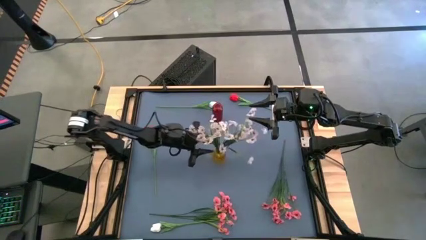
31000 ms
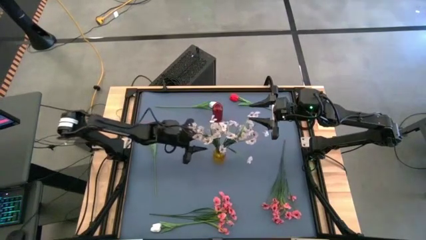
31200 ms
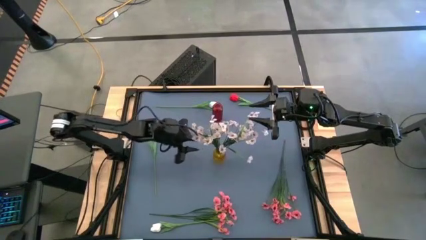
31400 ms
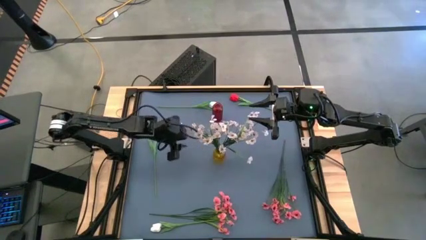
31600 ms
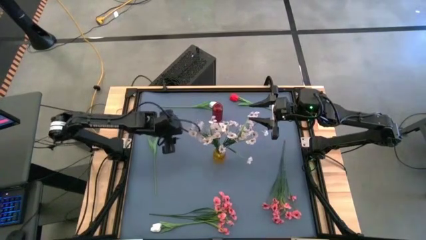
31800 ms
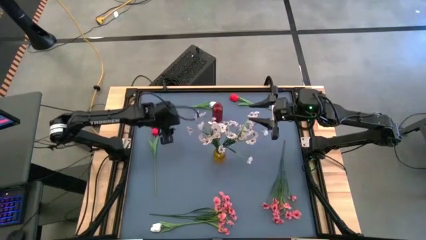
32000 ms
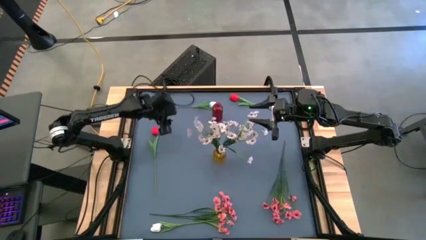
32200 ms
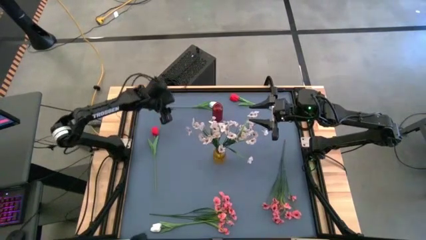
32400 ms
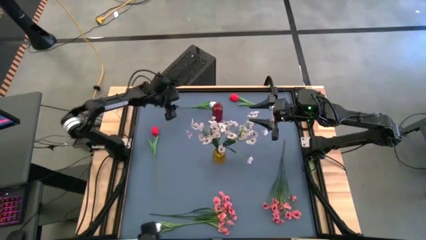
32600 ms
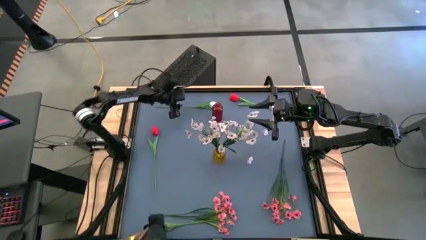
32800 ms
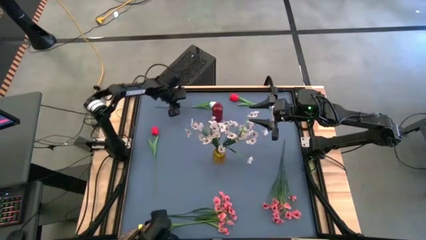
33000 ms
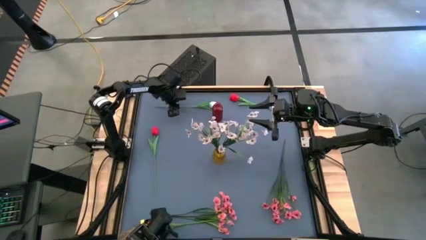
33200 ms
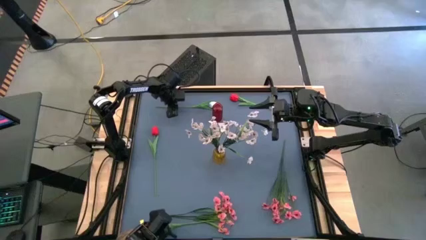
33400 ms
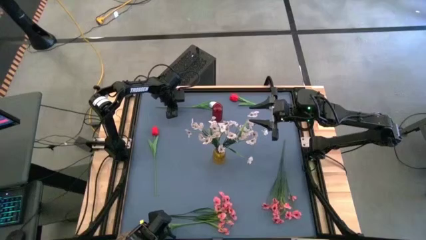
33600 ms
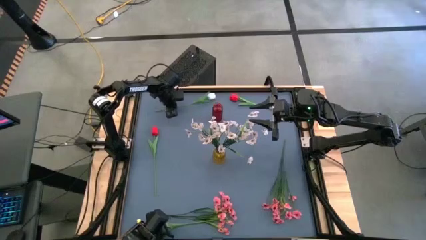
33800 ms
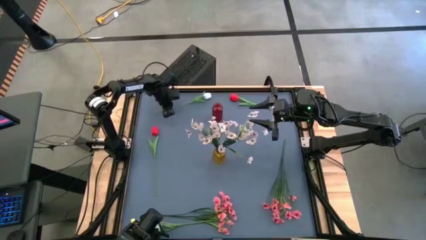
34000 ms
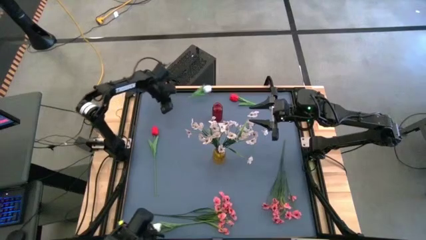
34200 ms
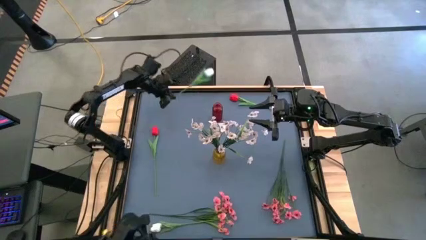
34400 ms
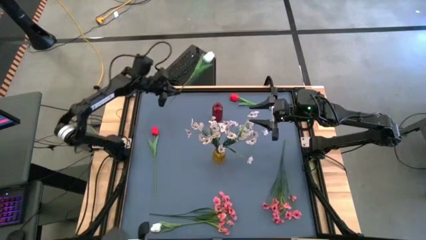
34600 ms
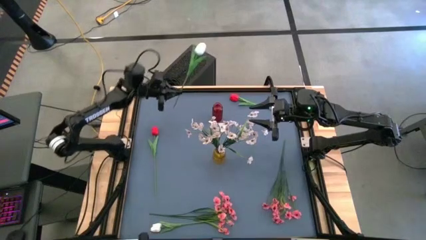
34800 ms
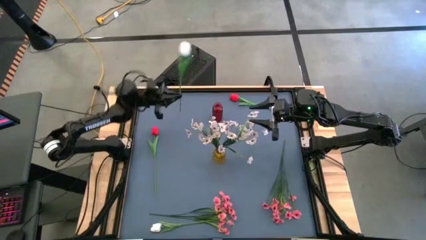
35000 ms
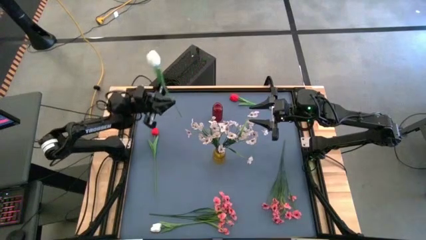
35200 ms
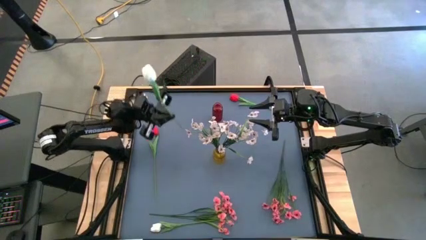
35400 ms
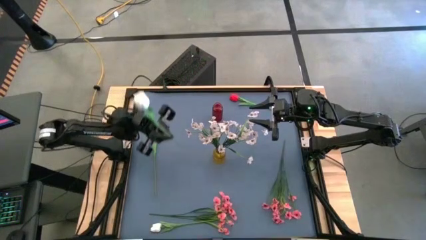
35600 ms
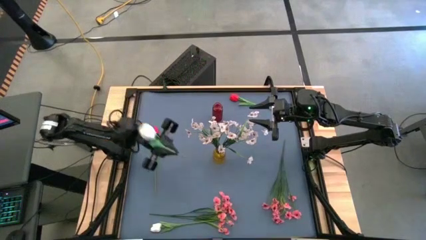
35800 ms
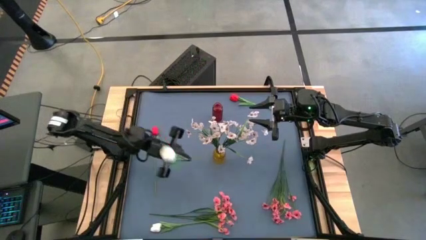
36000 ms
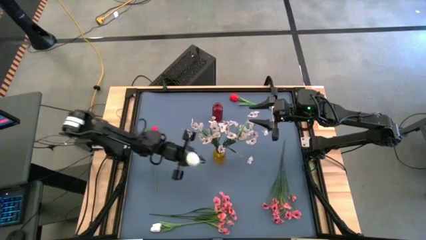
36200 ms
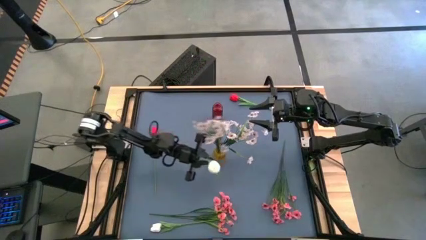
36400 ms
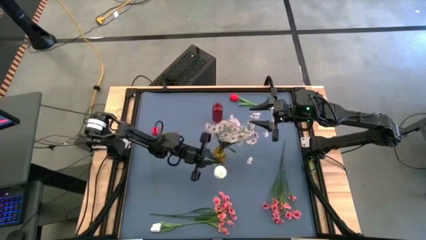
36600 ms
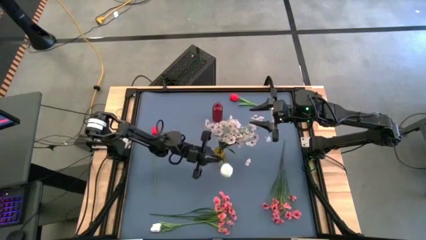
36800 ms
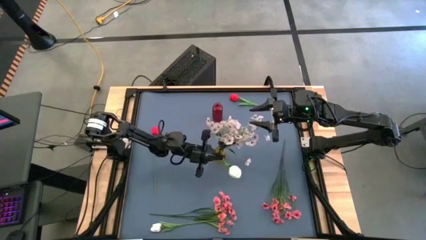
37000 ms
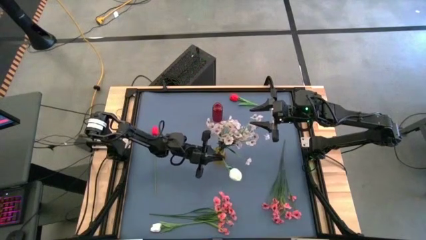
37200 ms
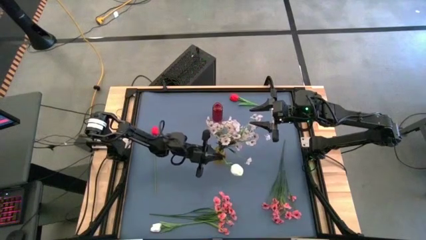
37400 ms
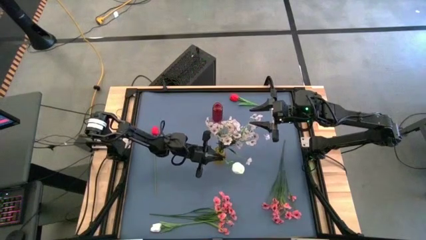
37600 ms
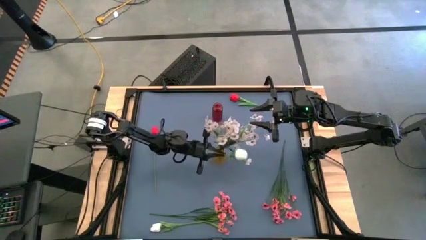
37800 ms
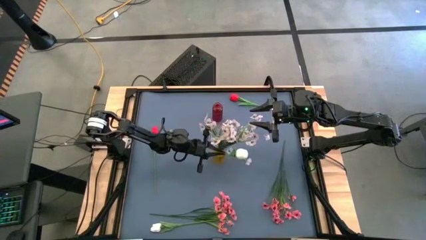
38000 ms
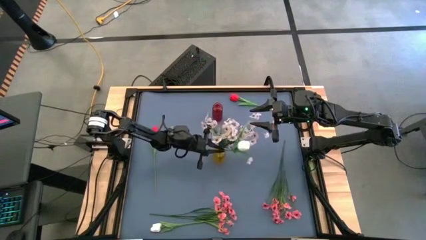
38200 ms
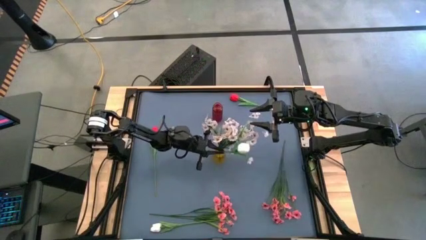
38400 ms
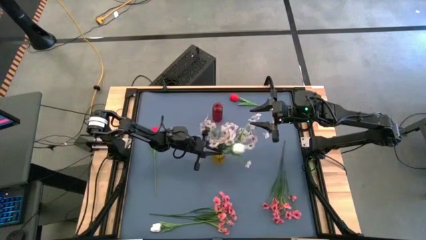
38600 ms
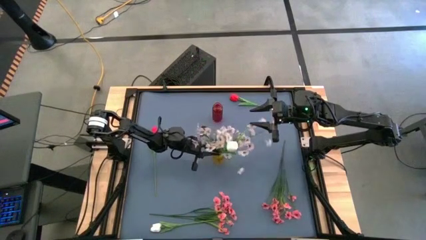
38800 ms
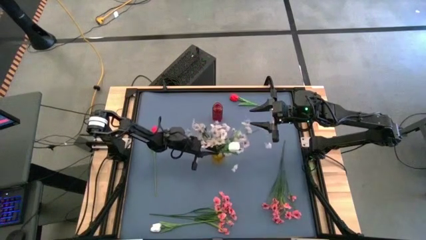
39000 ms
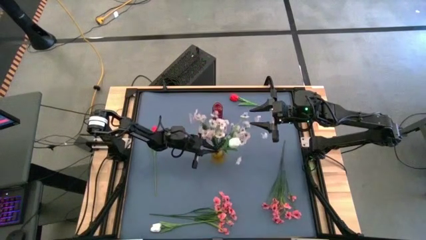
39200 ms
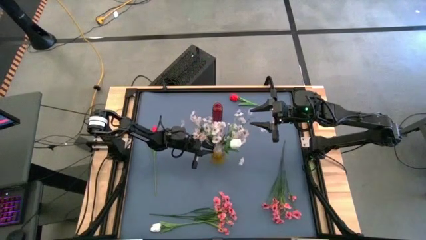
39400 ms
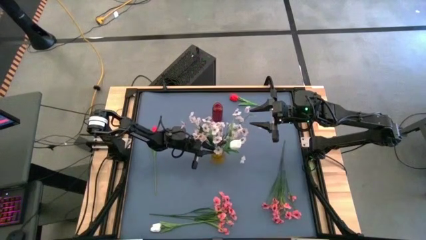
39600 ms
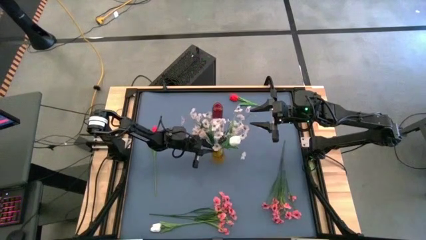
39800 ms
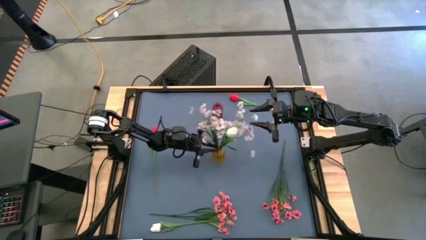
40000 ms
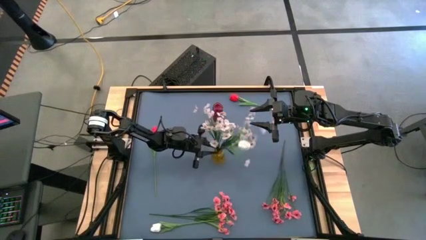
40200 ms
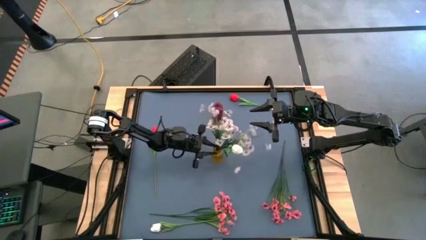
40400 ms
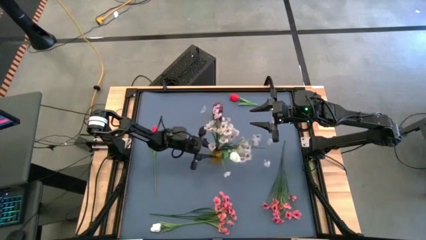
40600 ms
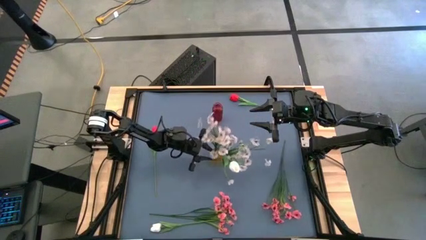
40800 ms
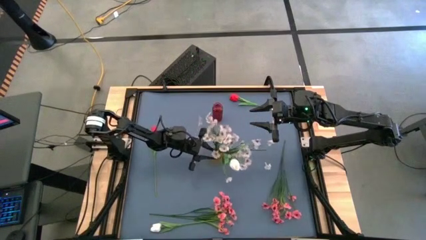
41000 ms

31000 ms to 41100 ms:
Task: Sort flowers into vase by color
Put the top white flower into the yellow flower vase

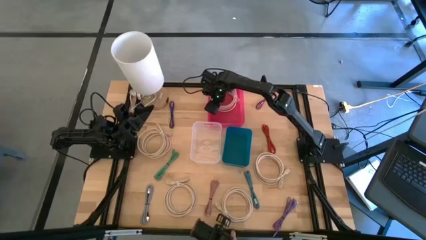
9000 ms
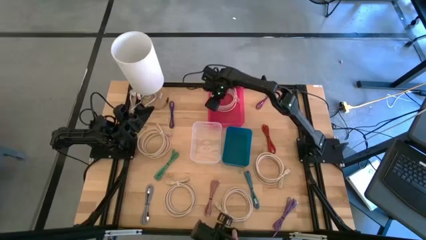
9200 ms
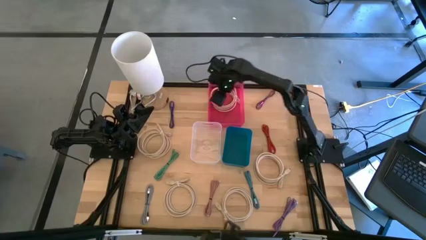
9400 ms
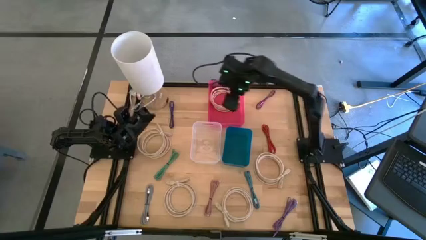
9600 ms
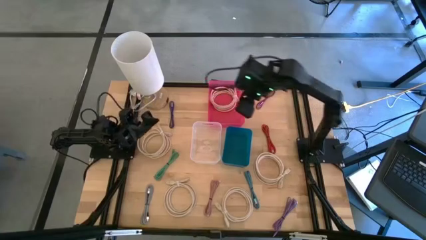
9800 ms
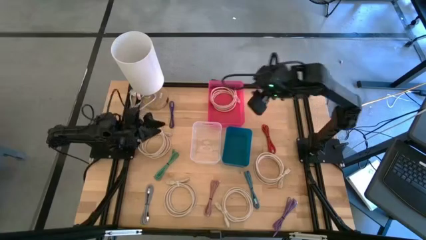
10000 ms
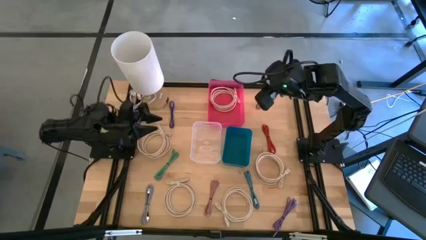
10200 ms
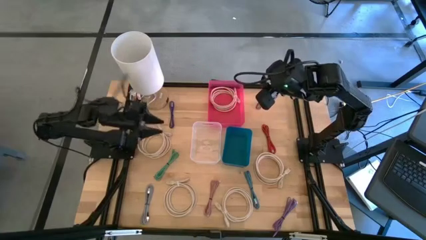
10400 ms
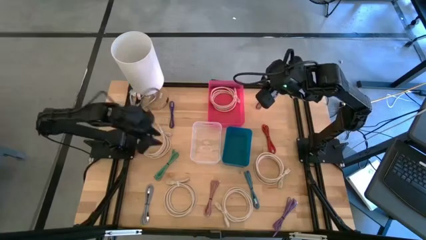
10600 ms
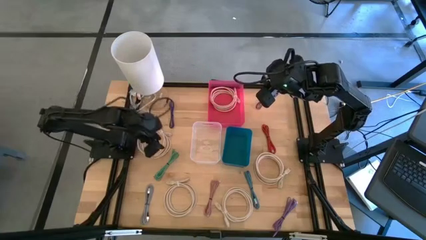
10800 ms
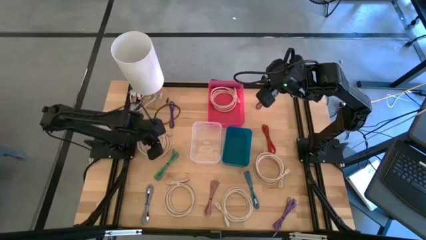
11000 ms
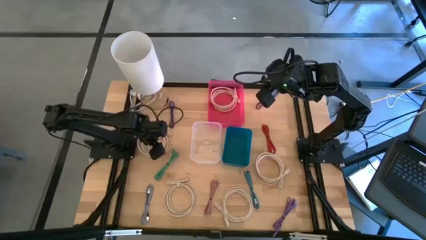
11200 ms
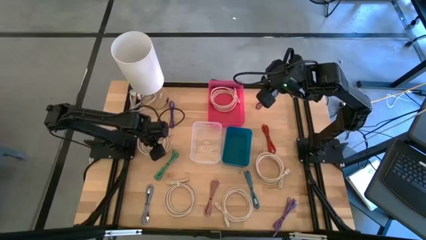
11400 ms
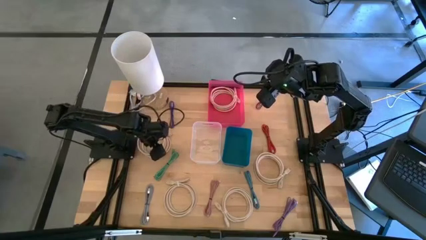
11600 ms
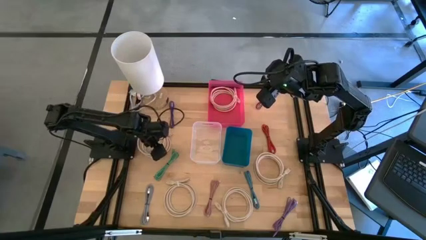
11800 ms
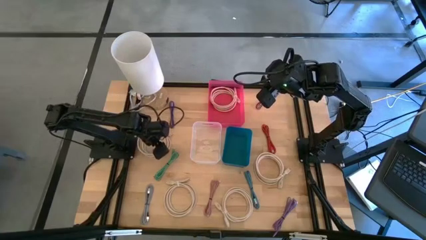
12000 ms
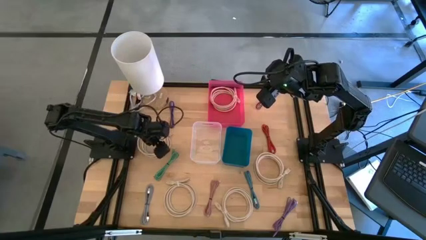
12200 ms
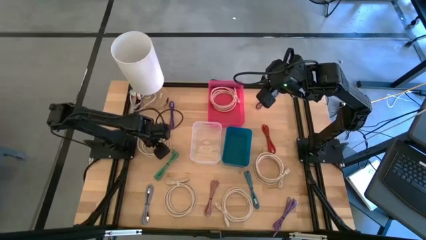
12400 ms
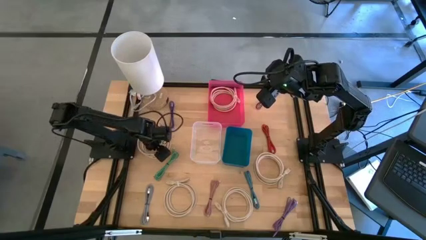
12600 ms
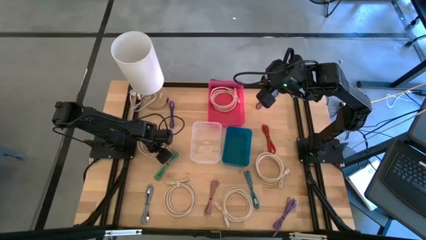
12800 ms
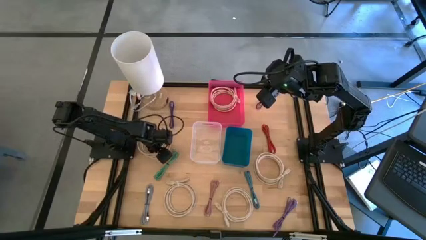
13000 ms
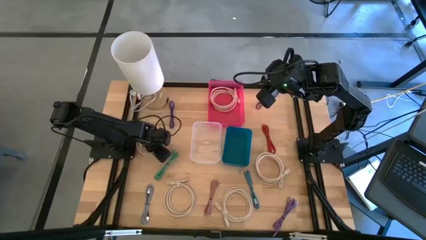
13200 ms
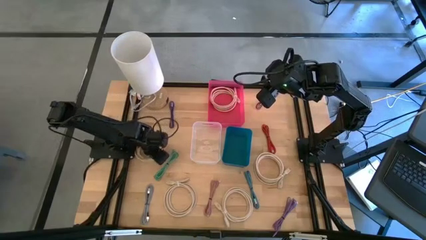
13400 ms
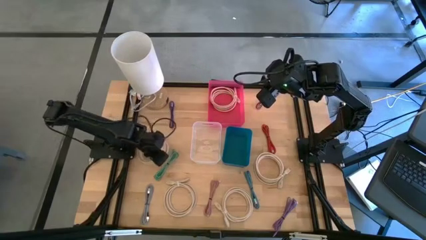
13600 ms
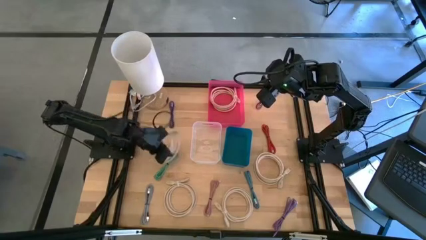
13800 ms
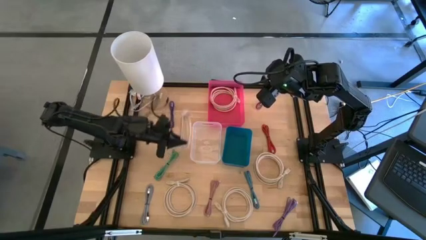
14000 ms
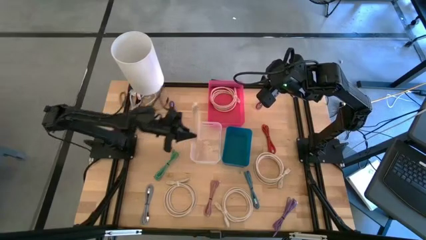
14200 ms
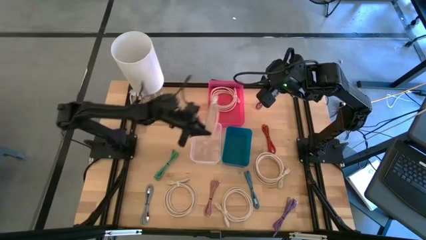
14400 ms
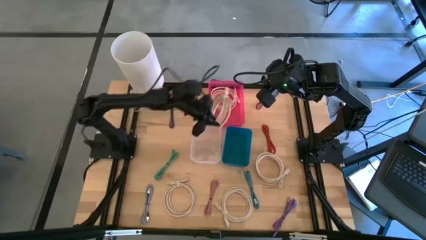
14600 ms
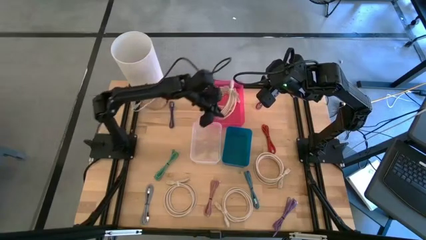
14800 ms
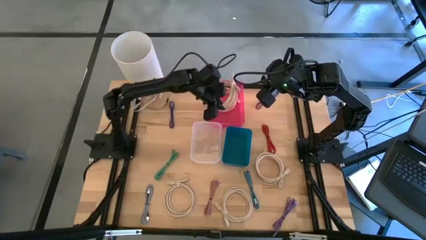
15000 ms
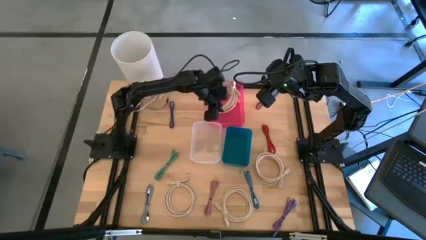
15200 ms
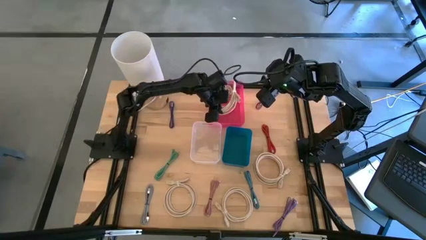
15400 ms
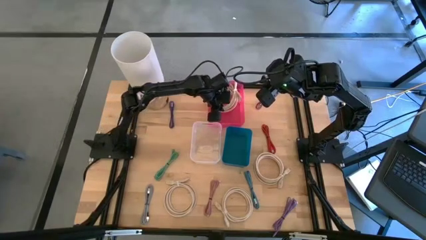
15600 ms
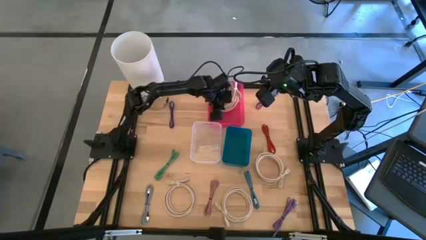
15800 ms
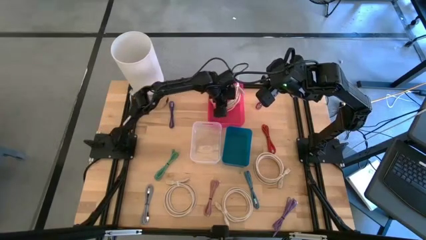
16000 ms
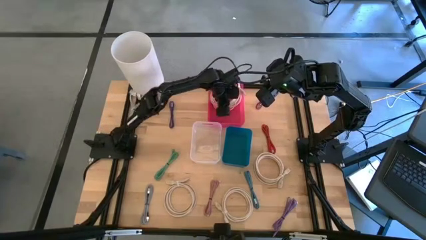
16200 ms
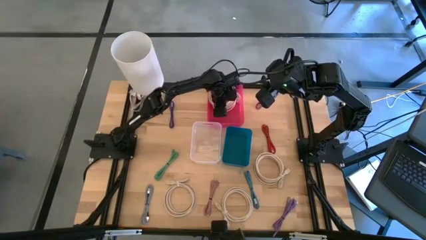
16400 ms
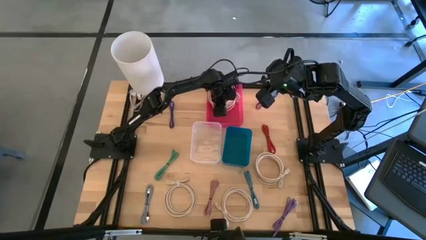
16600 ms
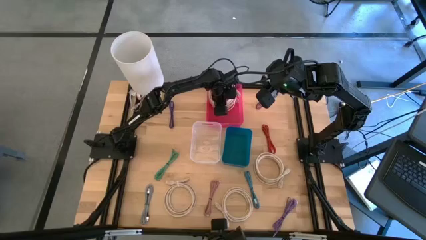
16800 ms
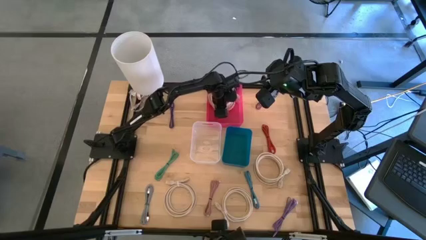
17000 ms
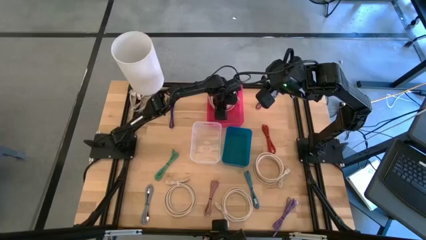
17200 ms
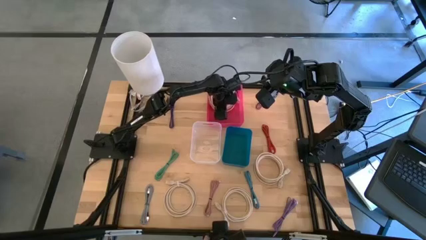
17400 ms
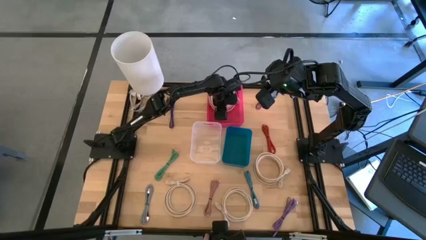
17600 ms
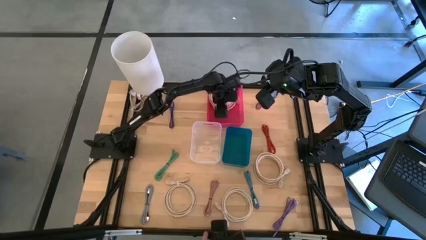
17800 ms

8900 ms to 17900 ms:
Task: Pick & Place USB Port
Put the light brown HDMI cable into the pink bin
